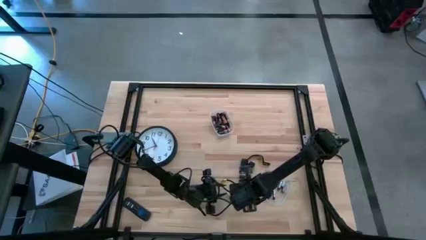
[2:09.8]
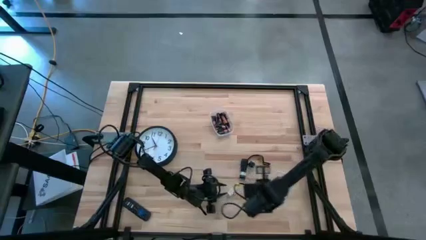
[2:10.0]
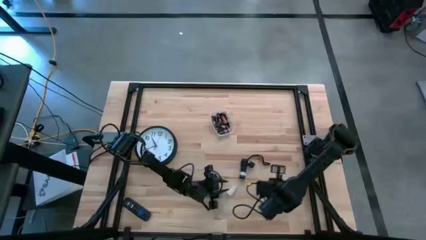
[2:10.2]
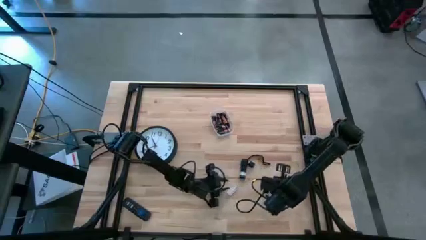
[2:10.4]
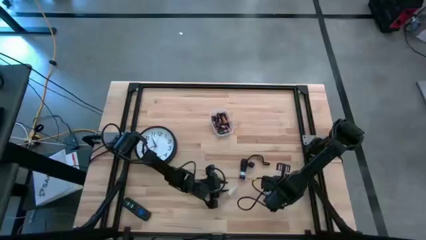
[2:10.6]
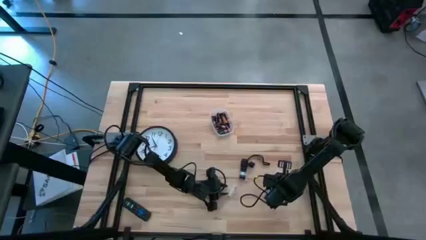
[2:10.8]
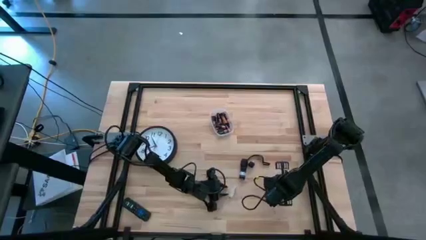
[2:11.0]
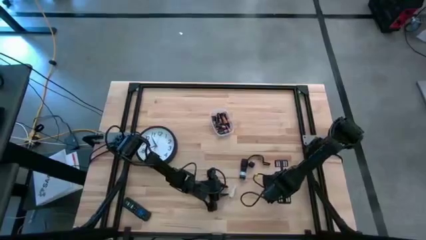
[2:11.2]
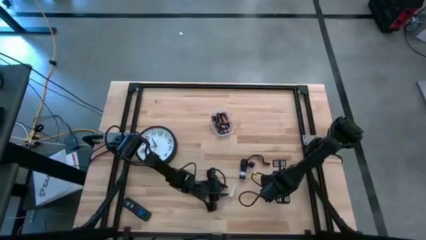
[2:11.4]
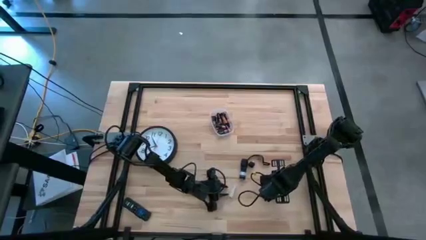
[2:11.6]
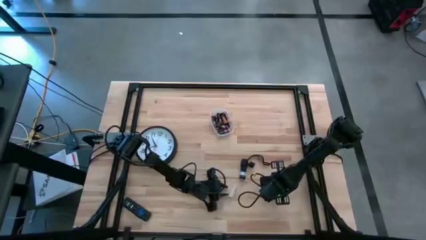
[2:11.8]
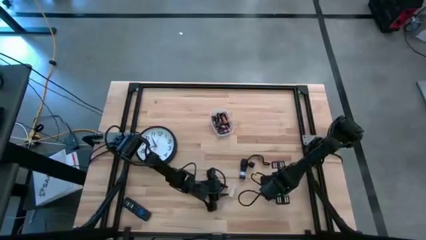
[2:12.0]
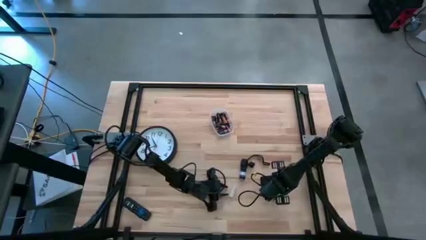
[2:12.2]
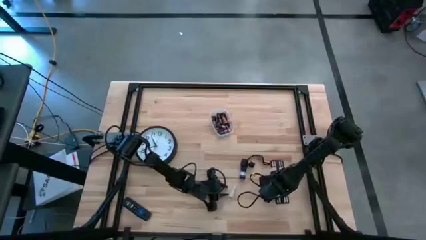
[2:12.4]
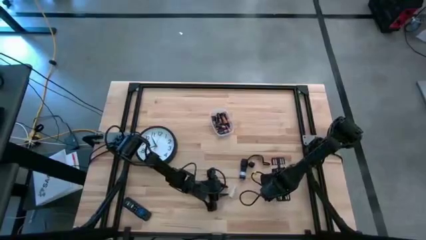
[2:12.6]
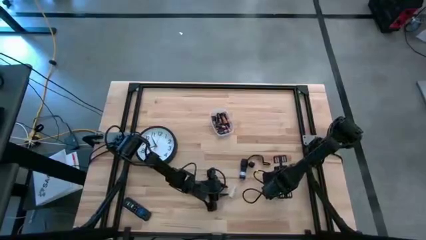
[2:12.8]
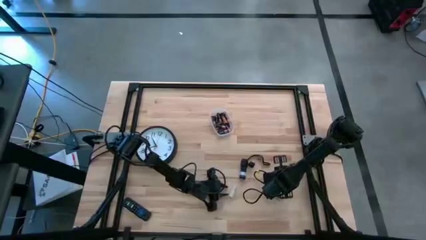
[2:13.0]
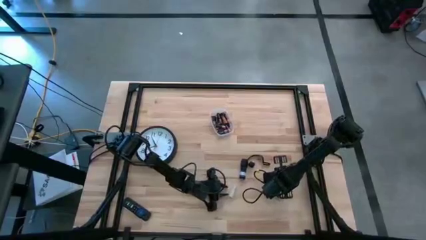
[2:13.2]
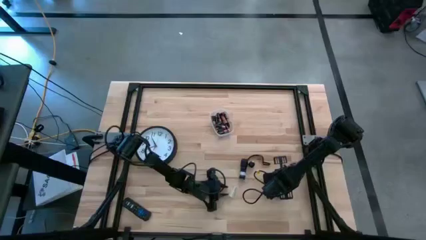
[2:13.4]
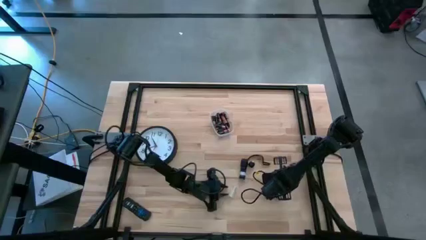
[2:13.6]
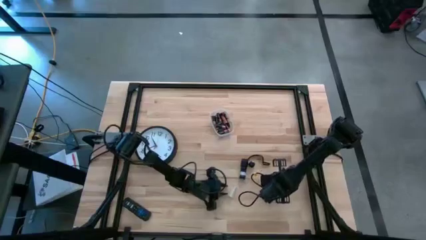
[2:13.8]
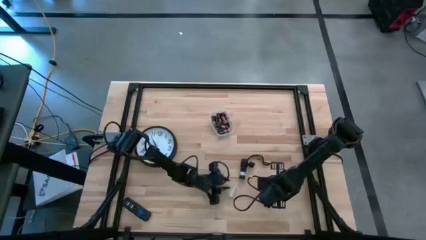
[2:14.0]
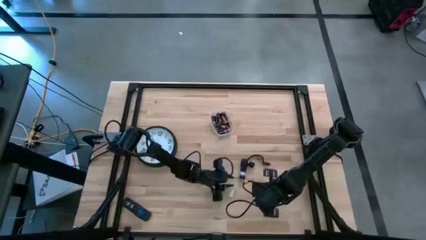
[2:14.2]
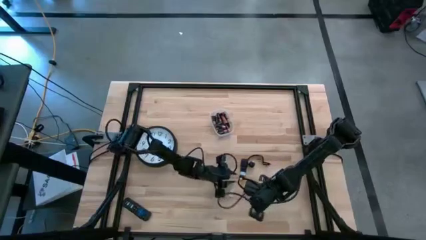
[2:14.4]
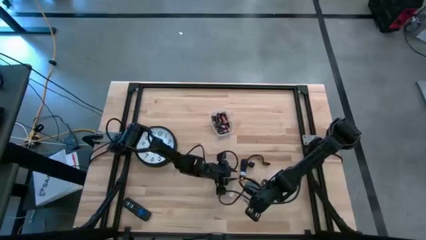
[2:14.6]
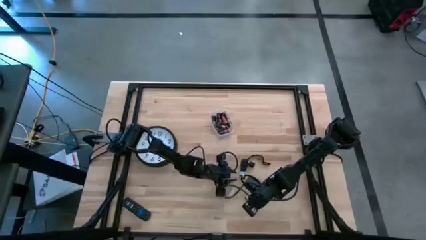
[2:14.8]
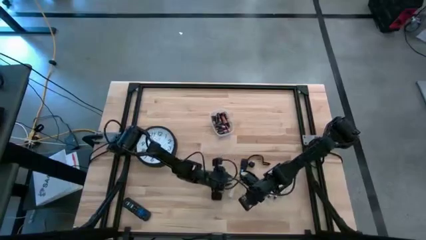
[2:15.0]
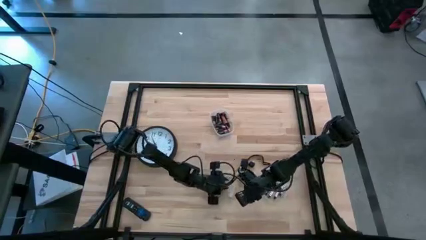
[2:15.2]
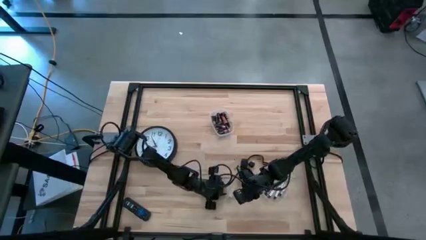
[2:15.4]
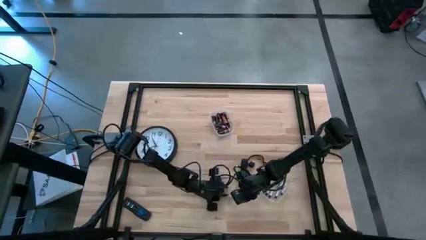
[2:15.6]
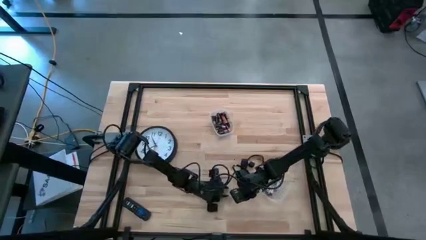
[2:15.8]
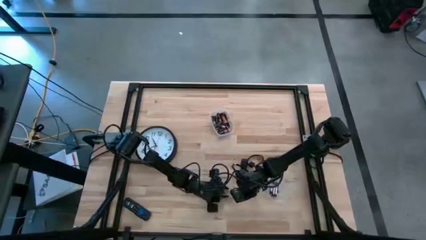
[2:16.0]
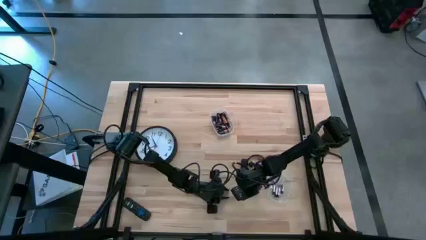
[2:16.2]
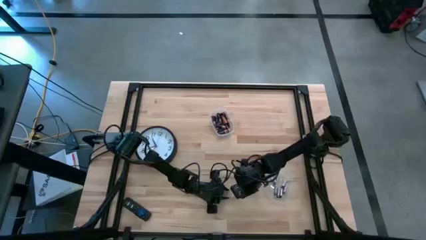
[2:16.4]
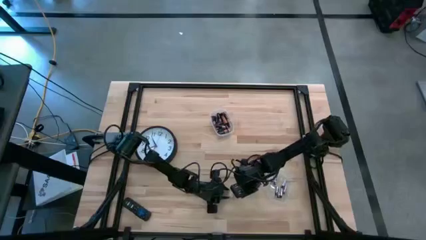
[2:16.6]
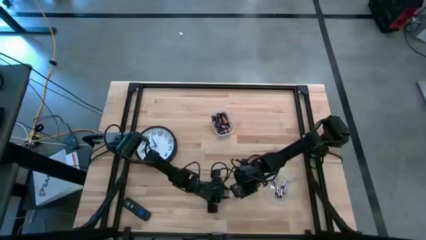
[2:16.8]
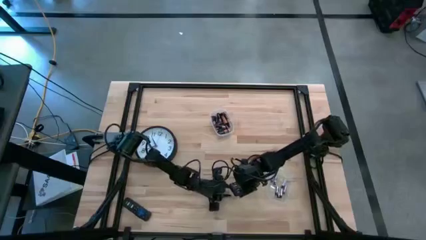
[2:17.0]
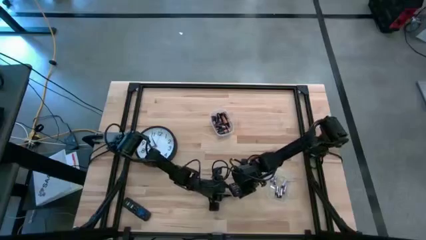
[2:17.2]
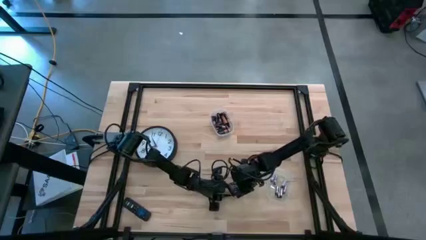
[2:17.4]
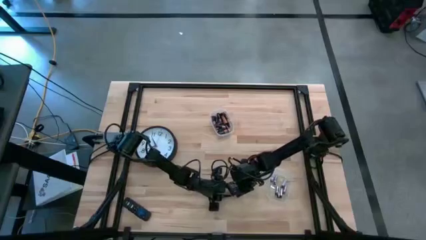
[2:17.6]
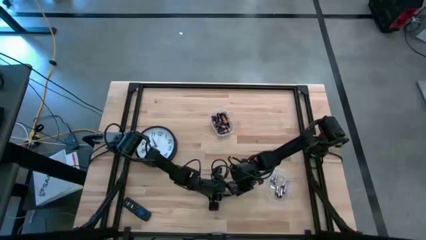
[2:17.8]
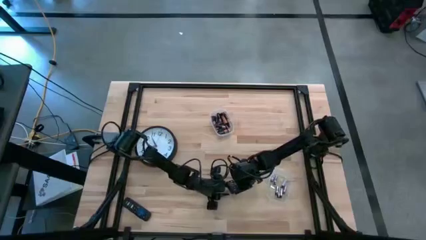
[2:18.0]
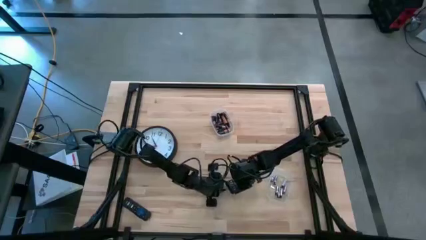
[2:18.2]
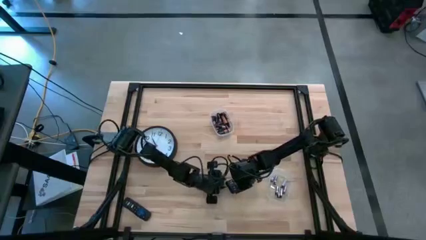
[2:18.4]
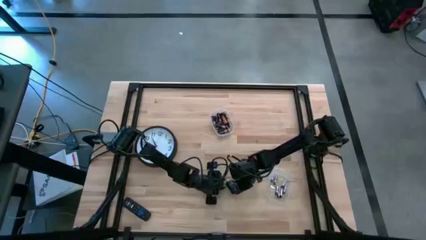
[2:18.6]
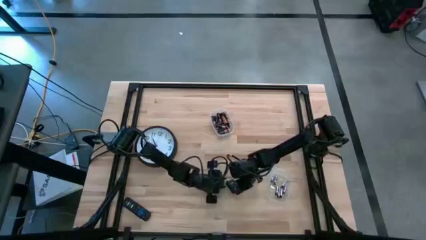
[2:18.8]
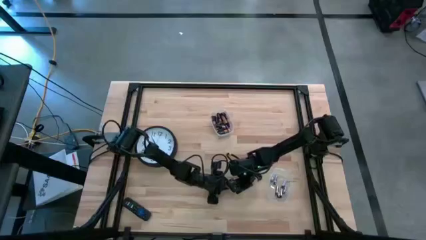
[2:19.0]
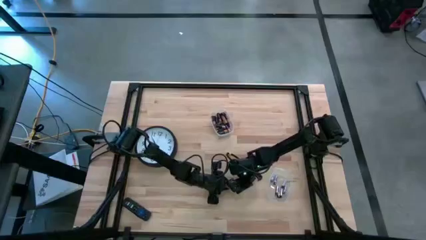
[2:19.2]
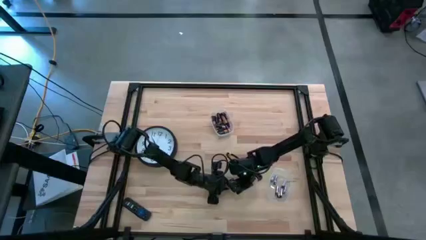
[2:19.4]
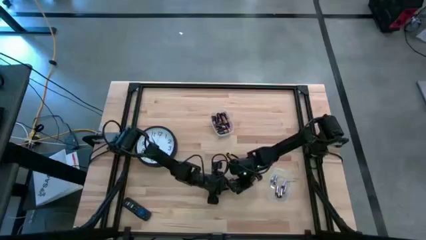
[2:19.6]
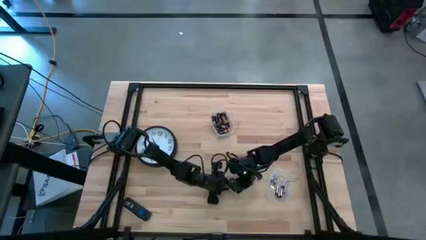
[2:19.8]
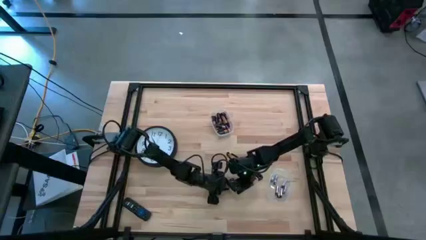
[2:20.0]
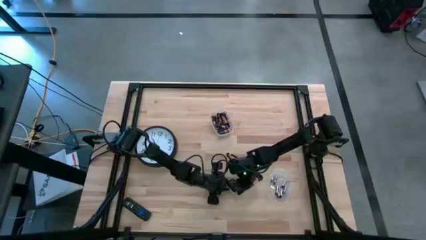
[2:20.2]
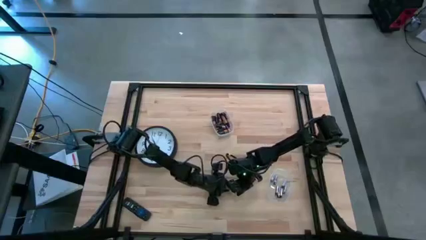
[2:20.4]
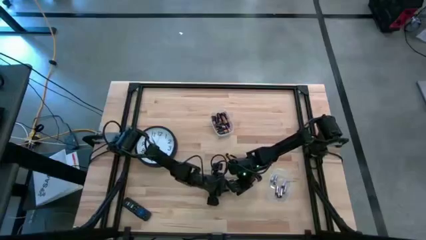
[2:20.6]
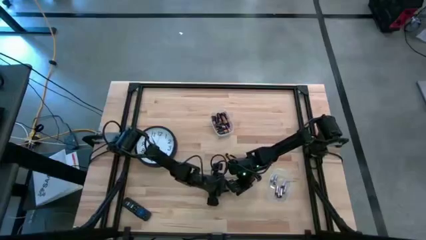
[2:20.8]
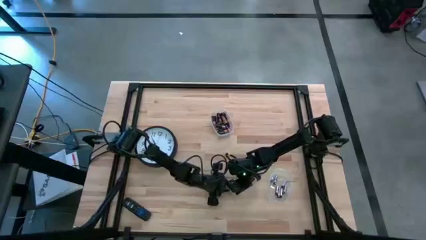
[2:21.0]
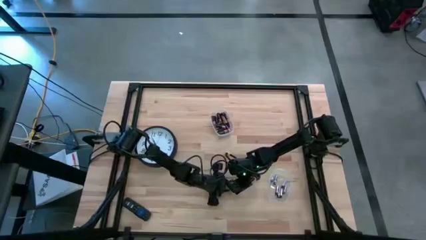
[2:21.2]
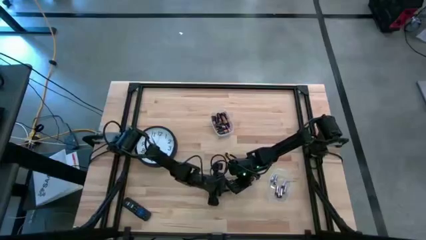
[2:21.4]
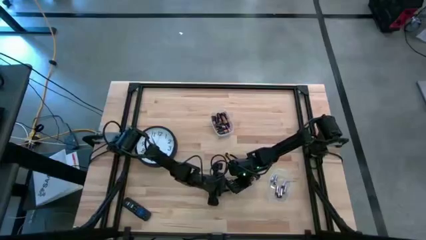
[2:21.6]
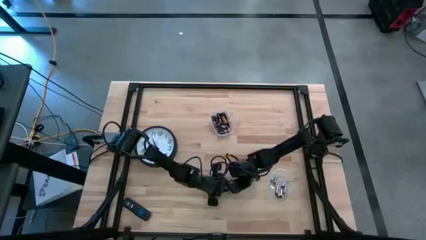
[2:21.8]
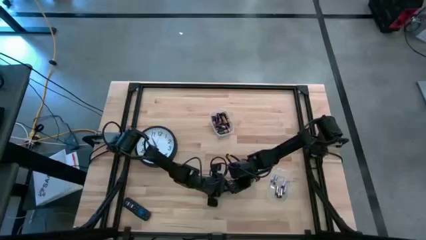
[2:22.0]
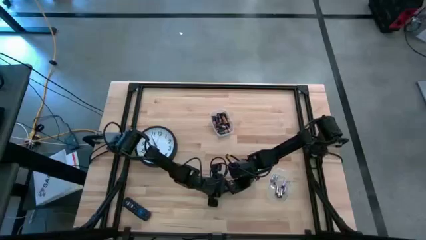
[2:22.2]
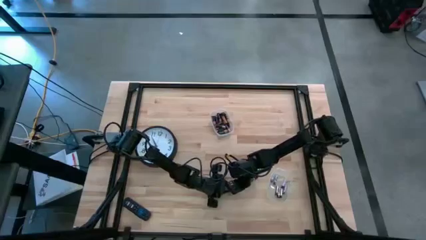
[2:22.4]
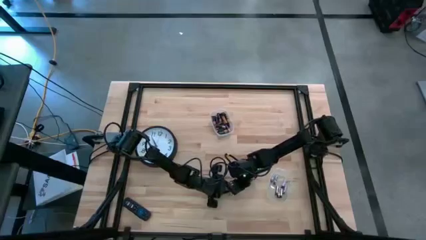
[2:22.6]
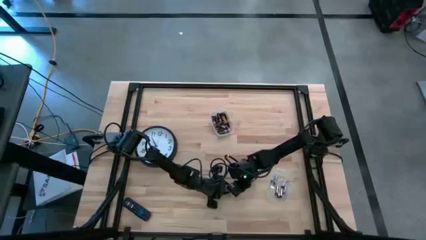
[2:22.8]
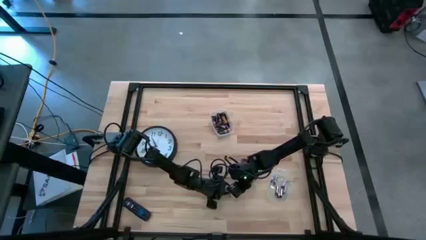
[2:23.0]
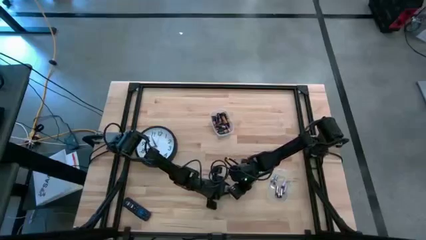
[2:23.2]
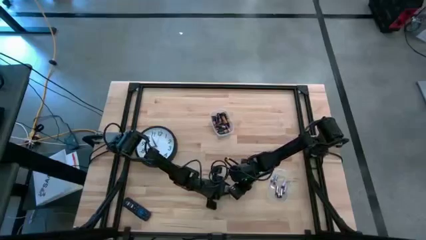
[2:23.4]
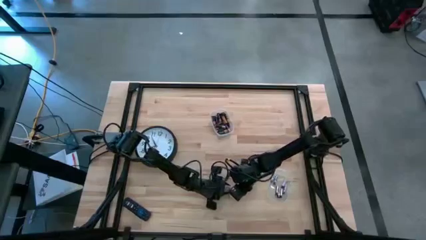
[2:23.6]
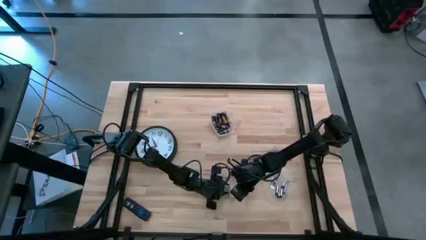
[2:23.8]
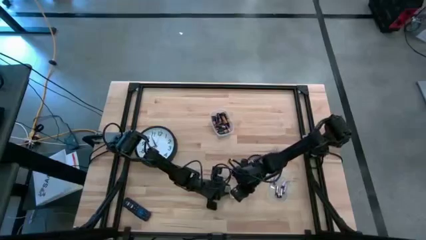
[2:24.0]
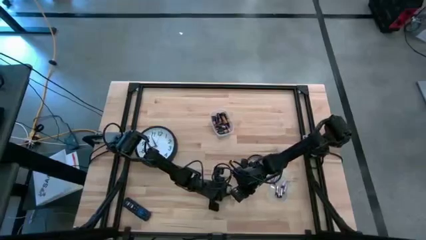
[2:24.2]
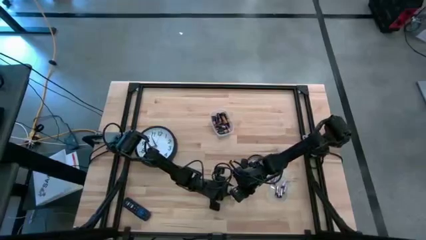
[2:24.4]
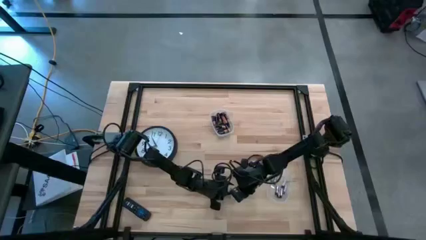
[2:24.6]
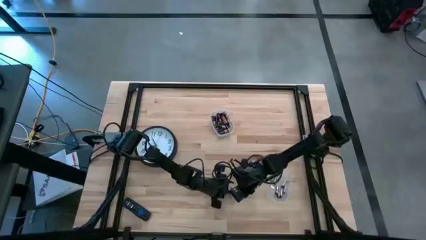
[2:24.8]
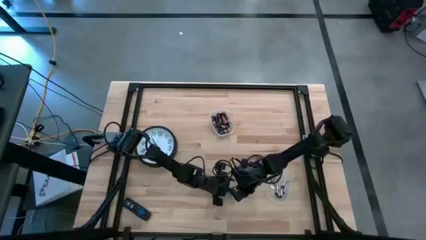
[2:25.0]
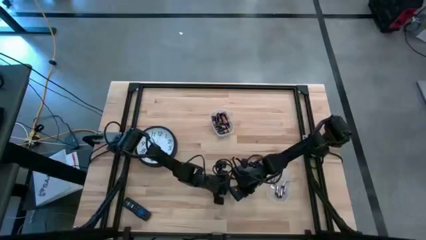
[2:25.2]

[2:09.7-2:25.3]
Task: Insert battery
Insert the silver battery into the battery holder

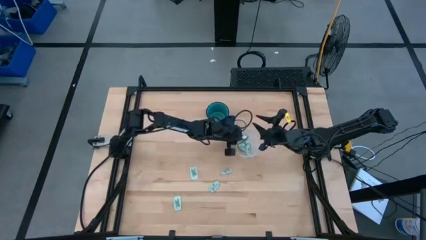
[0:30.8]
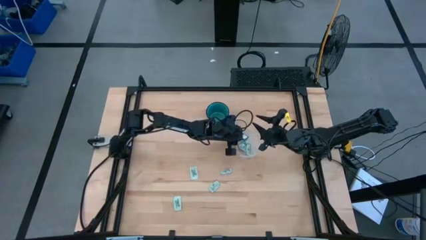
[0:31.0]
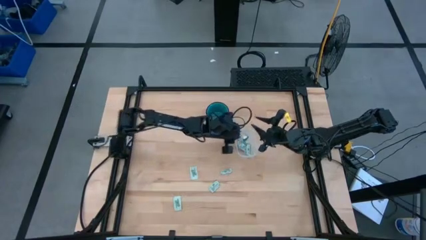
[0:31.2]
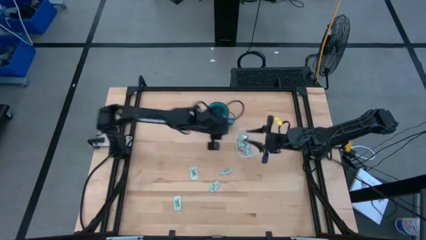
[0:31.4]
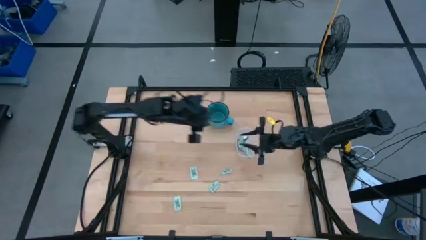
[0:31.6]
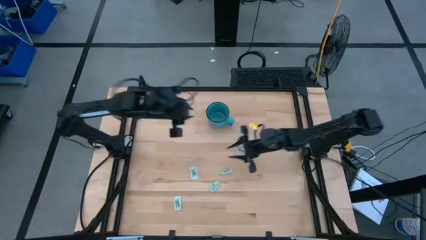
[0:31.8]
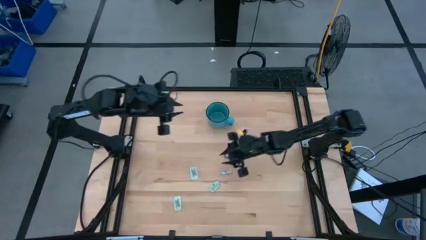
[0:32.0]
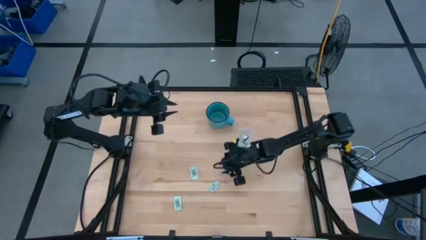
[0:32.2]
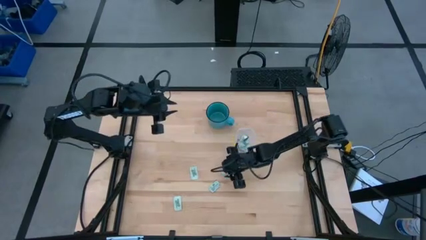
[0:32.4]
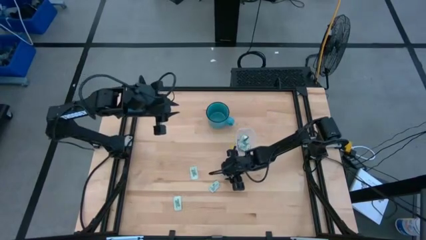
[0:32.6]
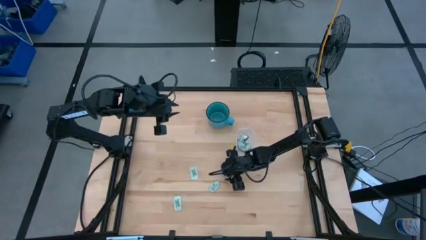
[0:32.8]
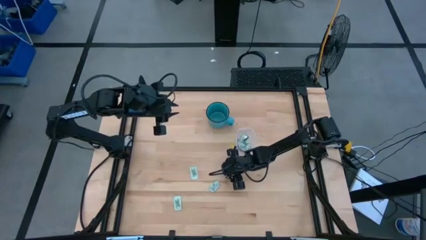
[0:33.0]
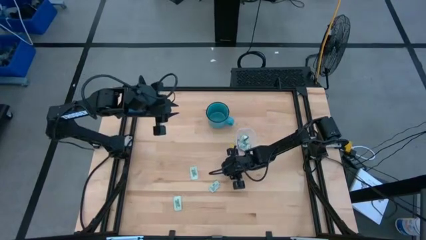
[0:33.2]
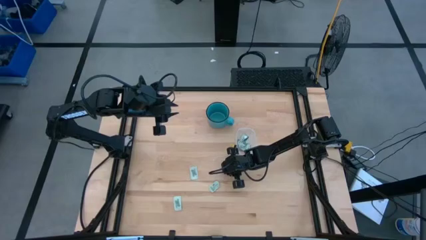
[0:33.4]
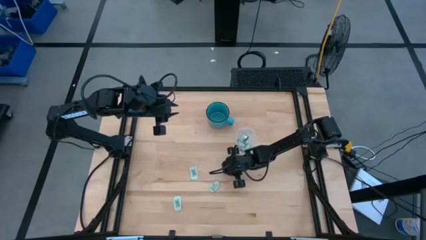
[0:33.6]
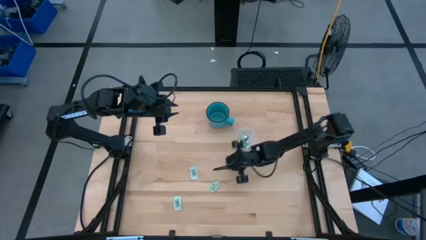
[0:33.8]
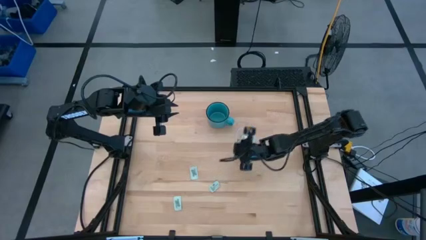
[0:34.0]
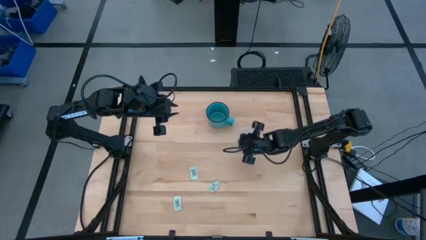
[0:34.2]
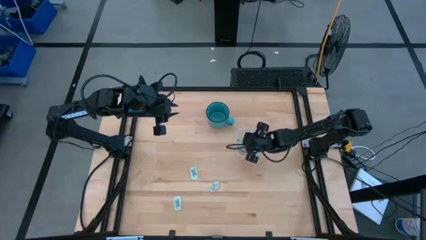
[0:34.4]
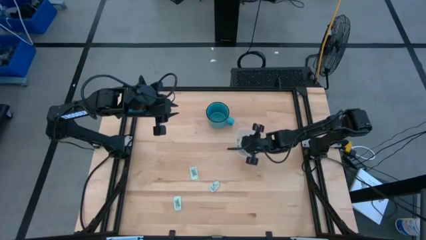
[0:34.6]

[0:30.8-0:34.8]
Task: Pick and place Stevia / Truvia into bins
Put the stevia packet into the transparent bin
